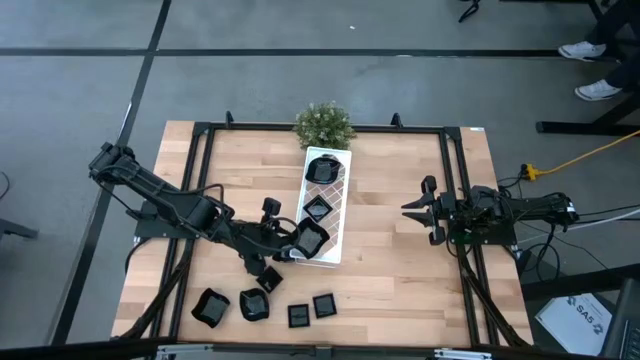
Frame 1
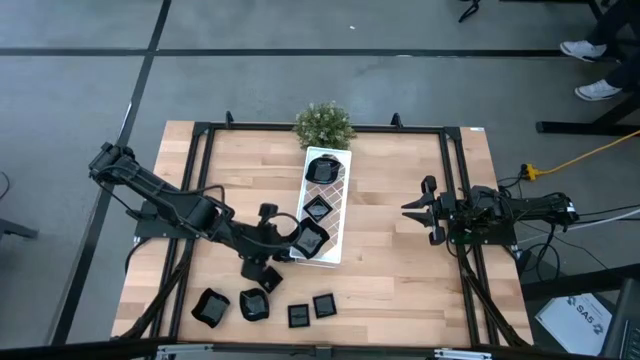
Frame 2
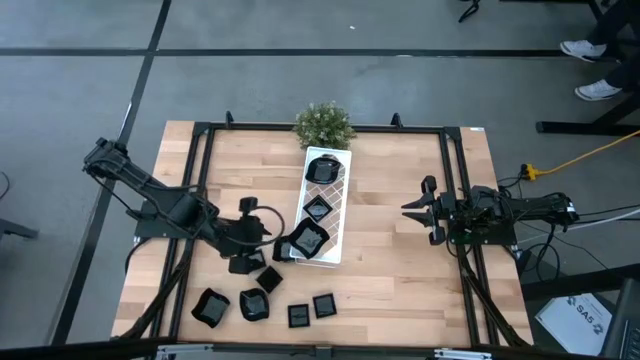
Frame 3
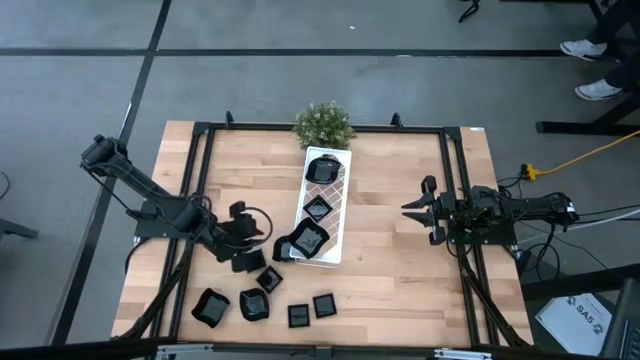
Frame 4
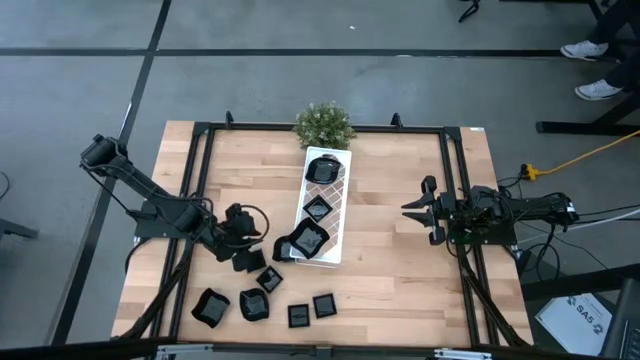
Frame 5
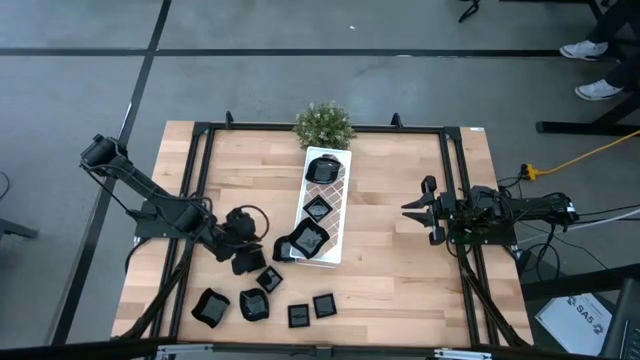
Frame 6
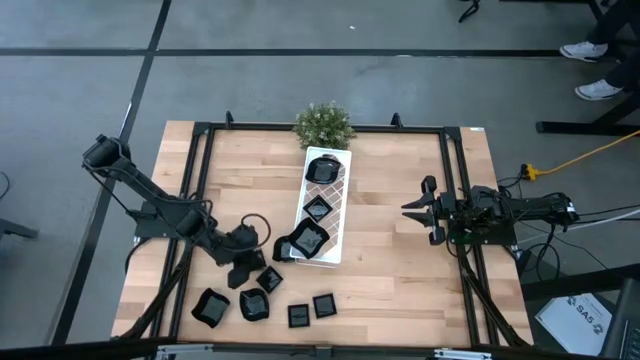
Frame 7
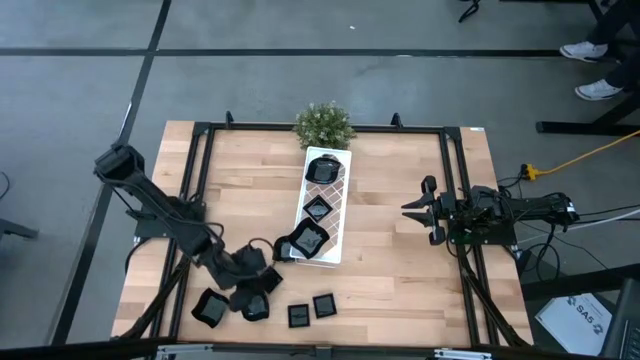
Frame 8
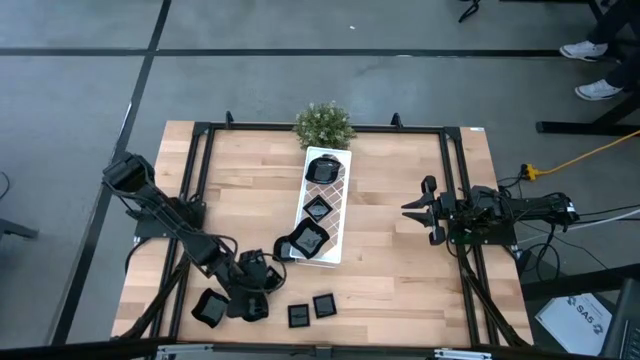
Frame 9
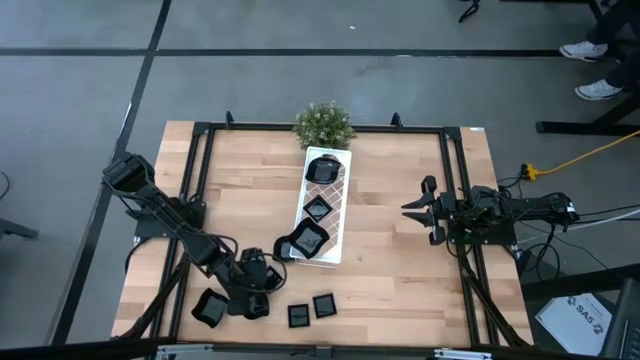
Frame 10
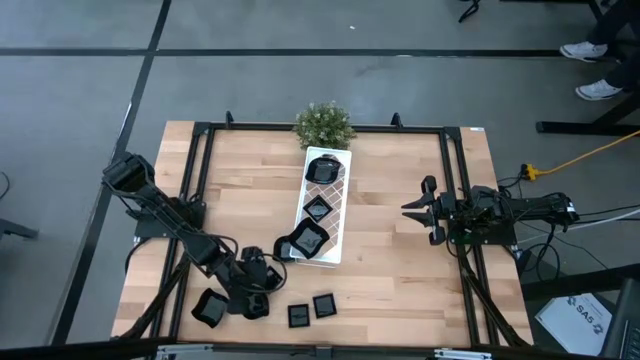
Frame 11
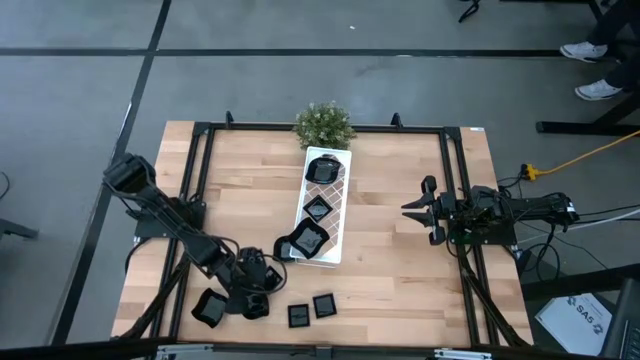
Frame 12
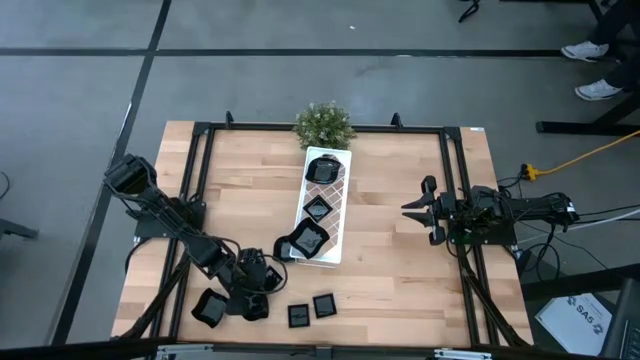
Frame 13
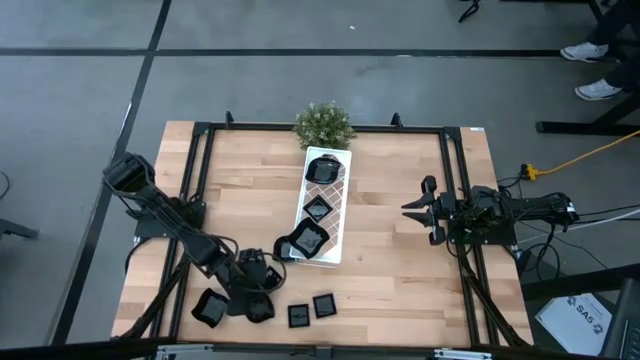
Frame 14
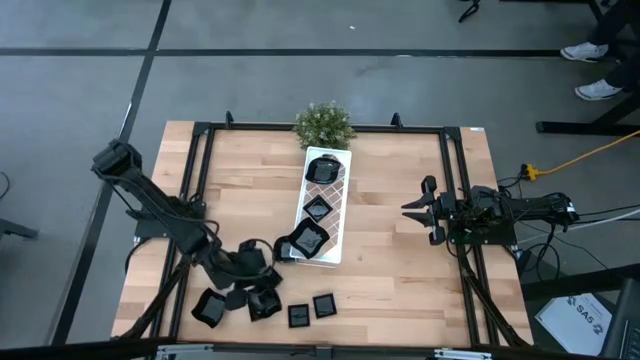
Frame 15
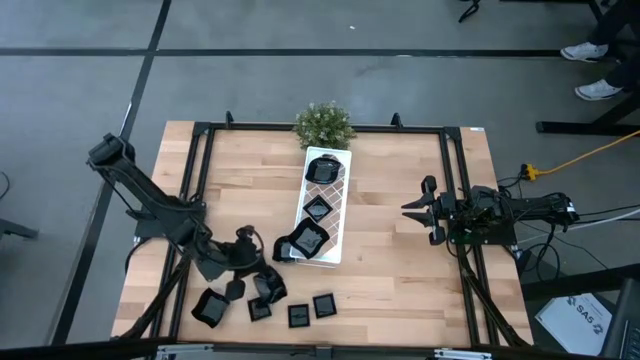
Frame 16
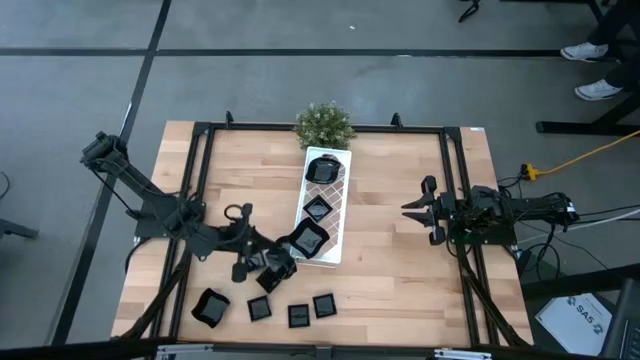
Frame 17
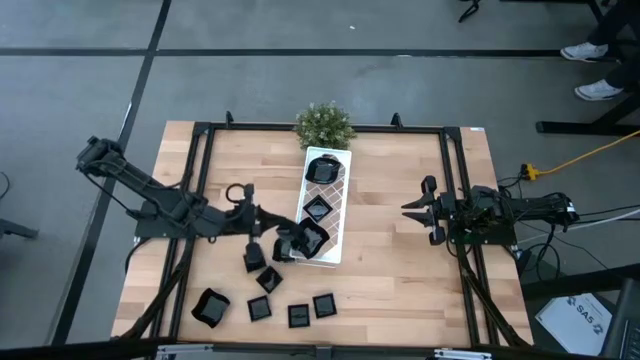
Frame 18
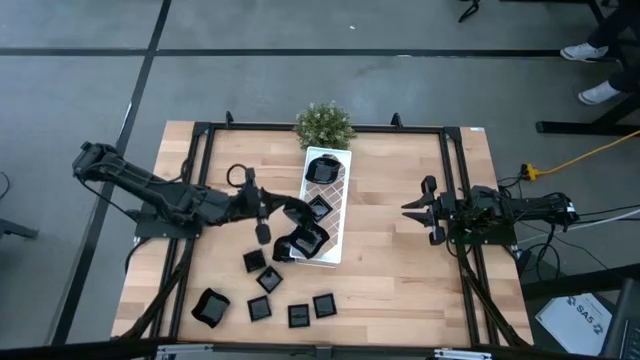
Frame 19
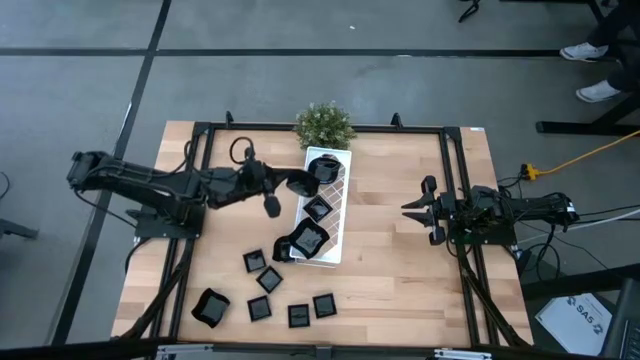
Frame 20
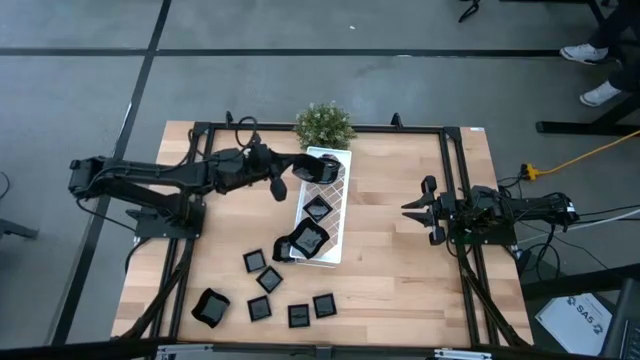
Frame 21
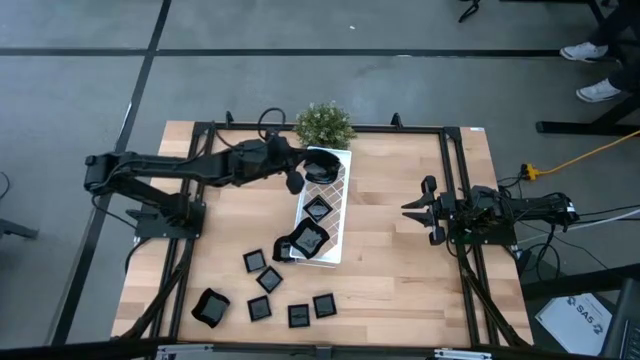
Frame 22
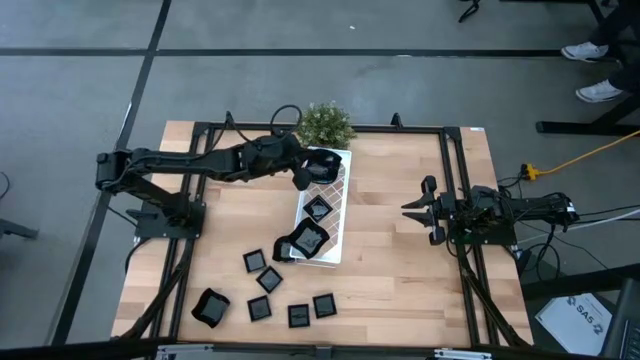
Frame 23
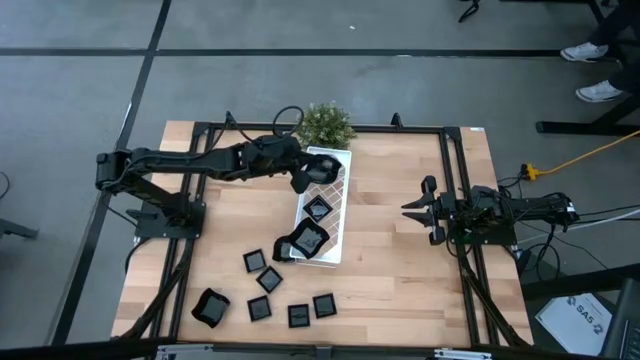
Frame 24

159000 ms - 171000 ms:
Task: Pick & Place Mini shaped plates
Stack the leaf shaped plate on top of the leaf shaped plate on the shelf

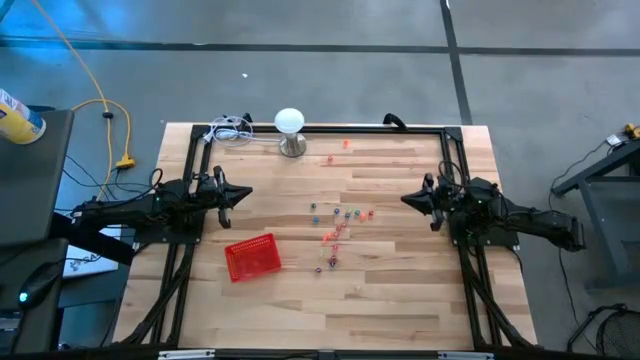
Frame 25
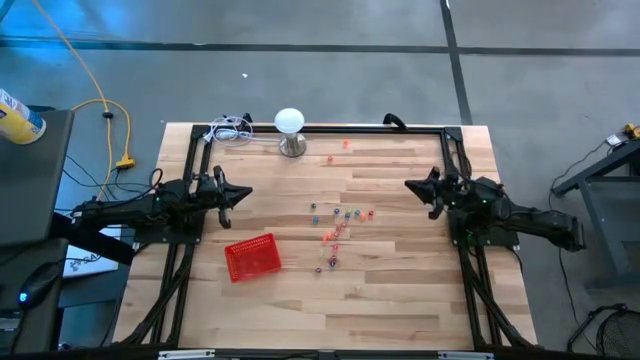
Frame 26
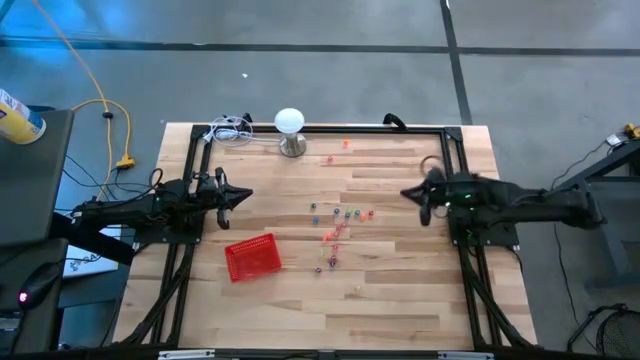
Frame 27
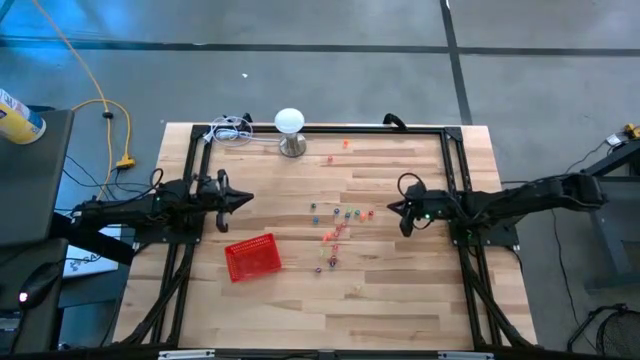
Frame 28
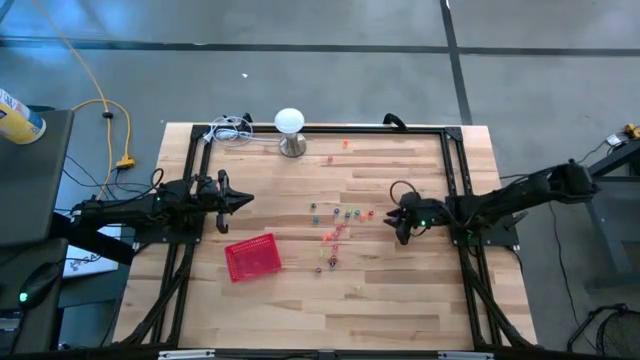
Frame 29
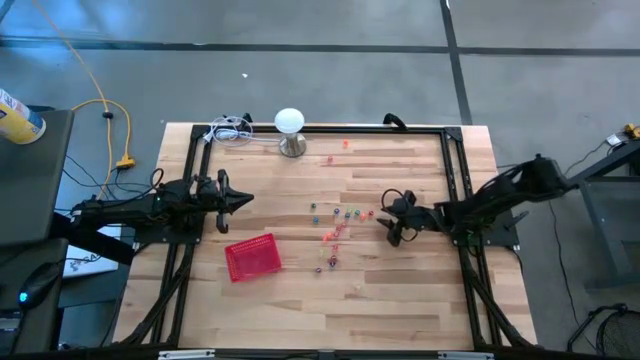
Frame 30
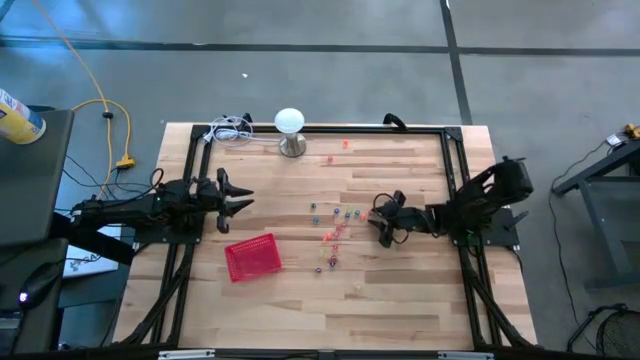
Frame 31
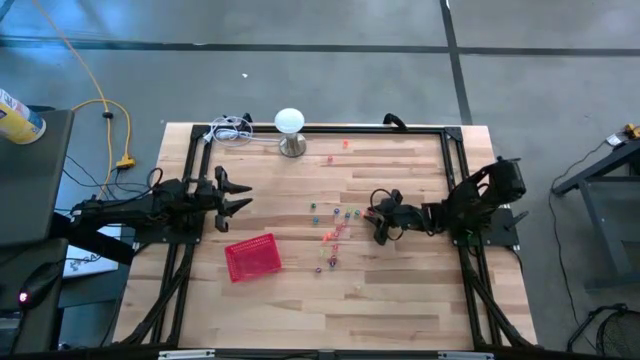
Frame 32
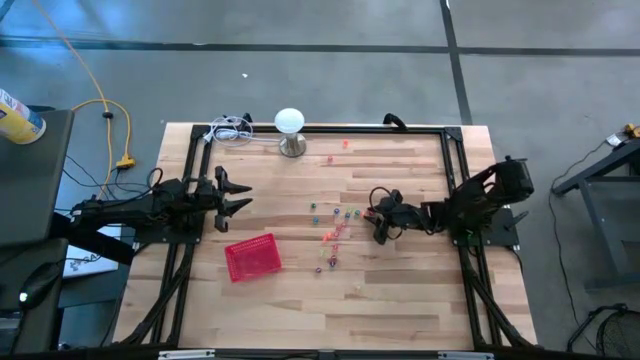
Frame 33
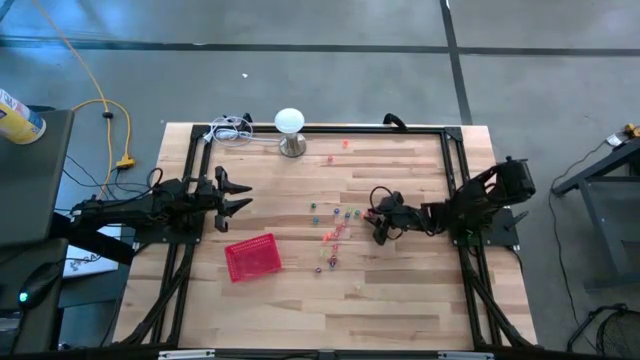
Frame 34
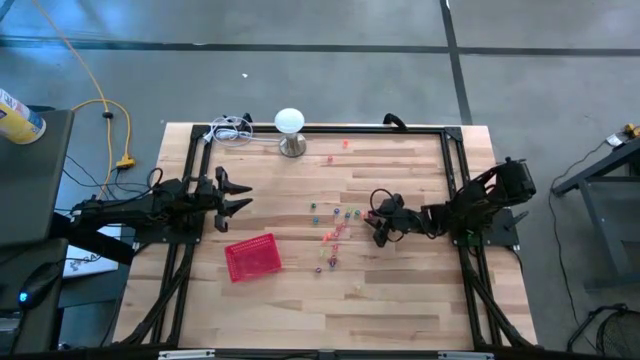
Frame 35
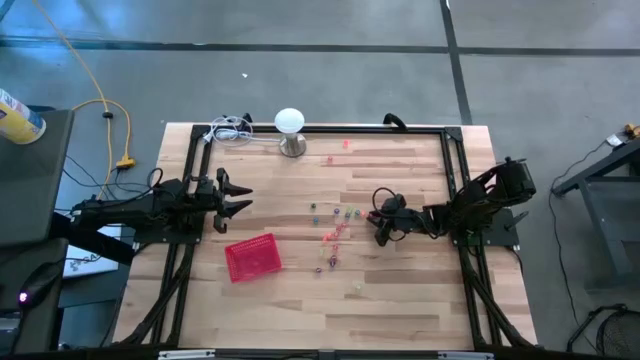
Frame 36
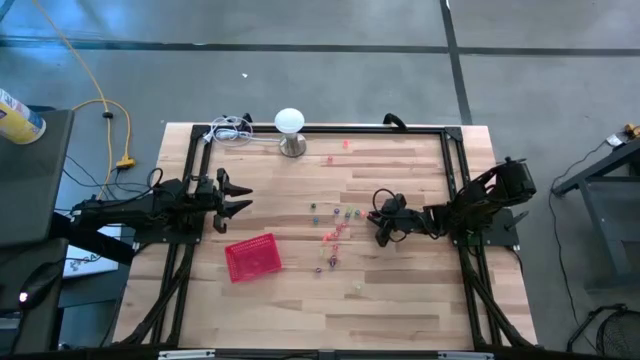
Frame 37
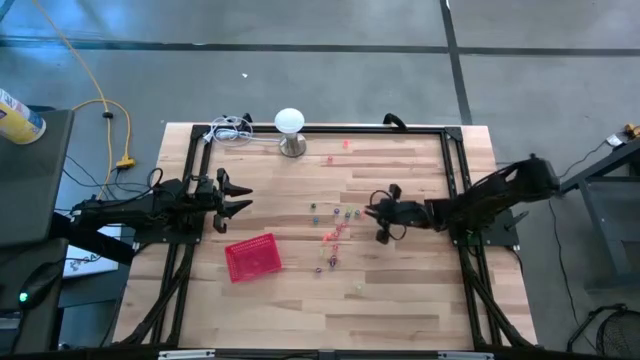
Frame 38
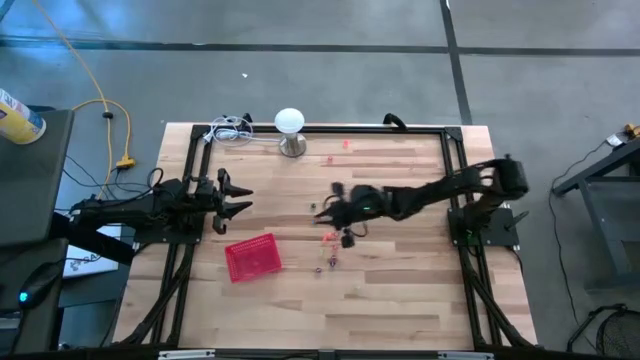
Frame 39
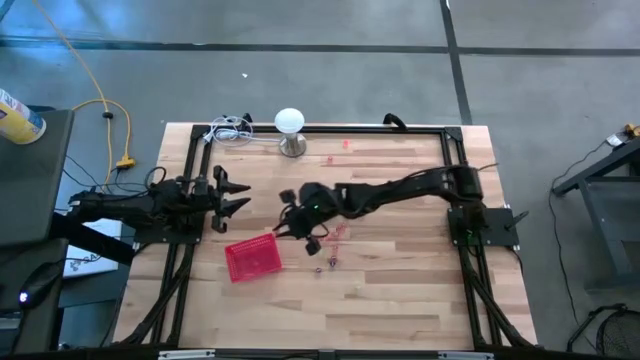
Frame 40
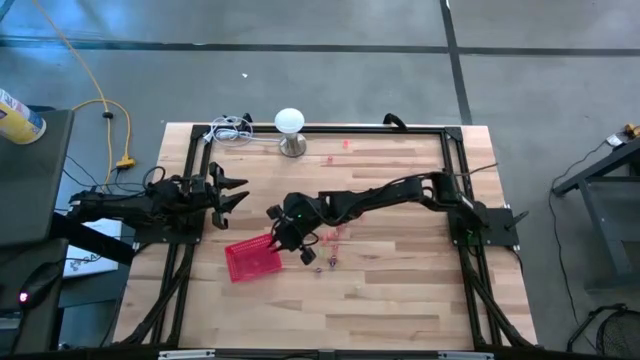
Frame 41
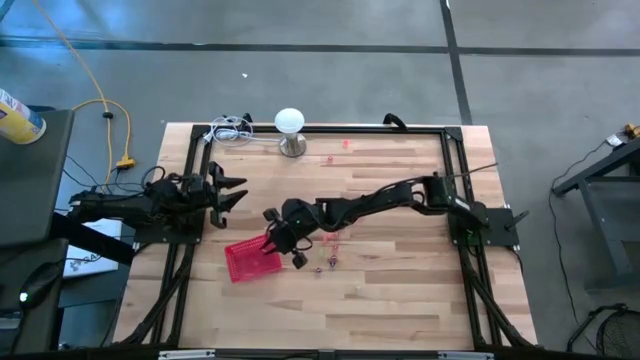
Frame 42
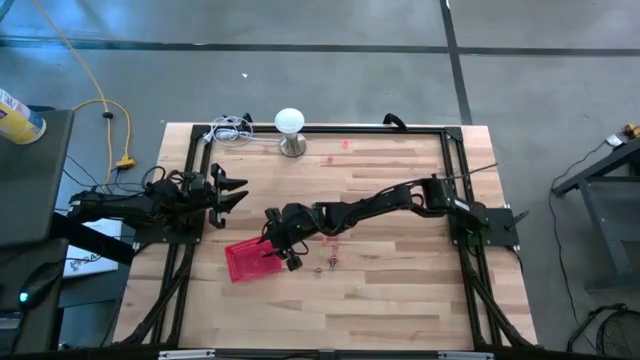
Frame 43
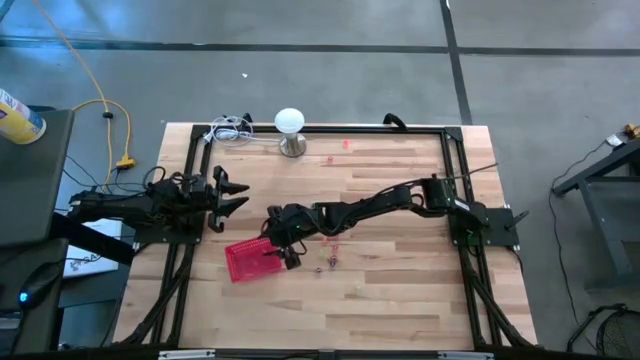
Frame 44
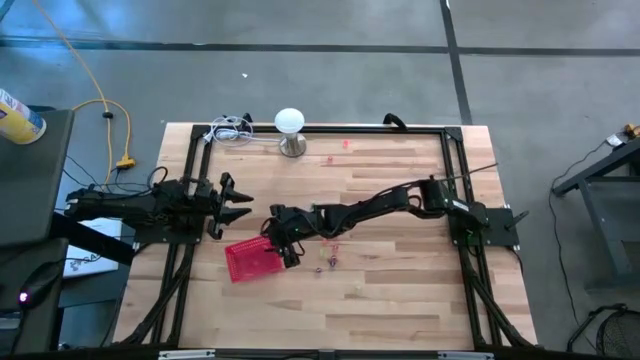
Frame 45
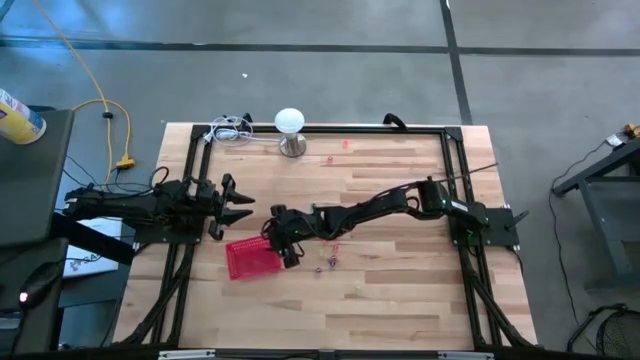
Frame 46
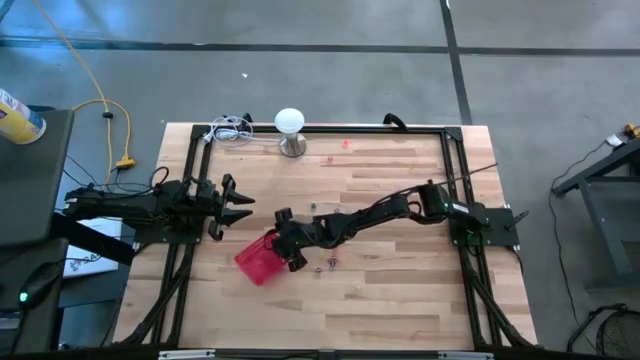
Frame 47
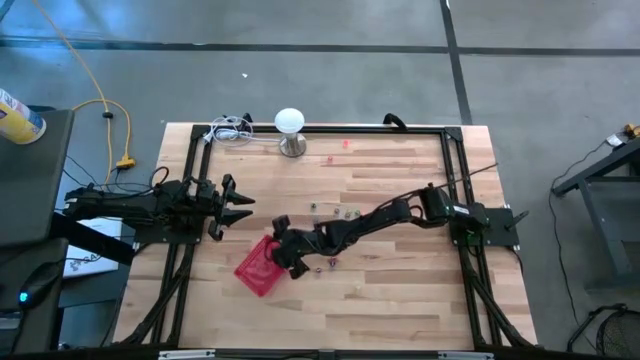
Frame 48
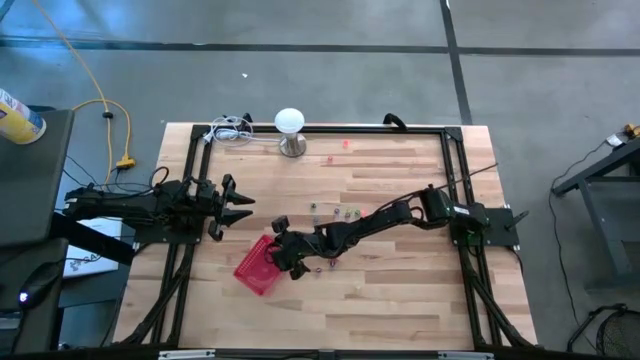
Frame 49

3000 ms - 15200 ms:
Task: Pick & Place Dice
Put the red die into the red basket
